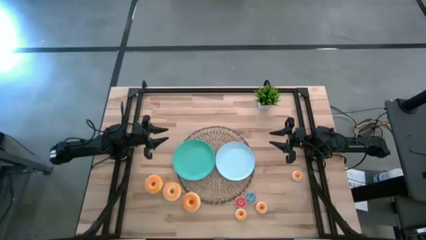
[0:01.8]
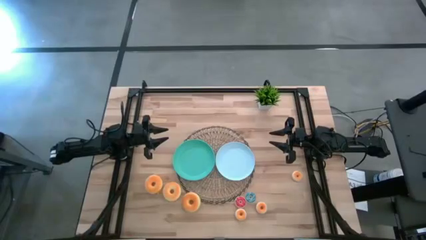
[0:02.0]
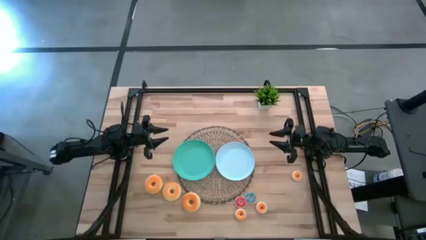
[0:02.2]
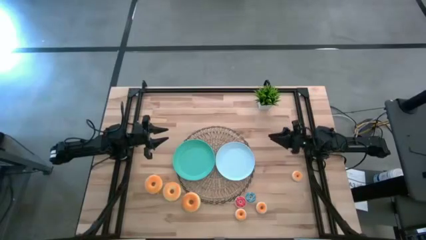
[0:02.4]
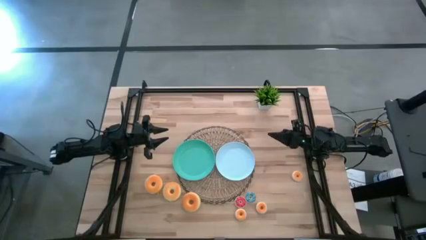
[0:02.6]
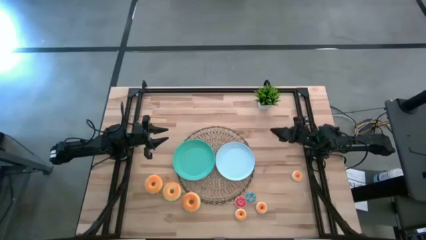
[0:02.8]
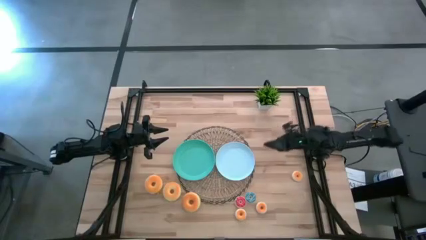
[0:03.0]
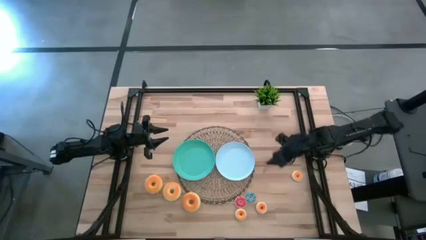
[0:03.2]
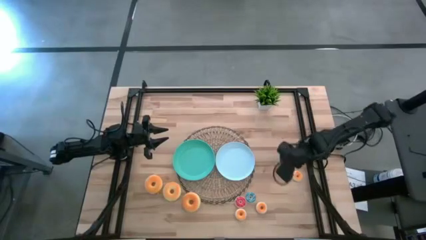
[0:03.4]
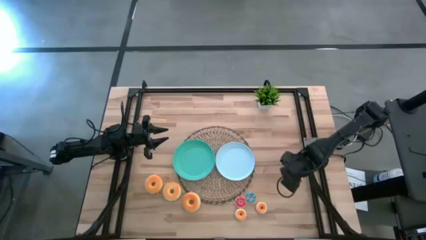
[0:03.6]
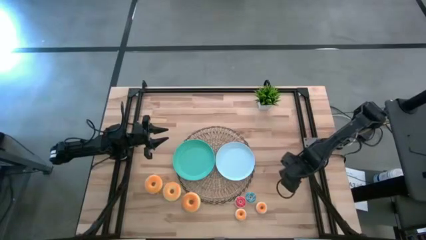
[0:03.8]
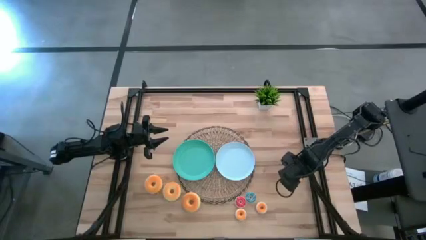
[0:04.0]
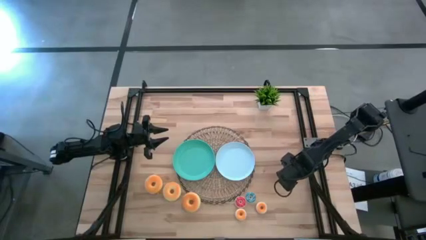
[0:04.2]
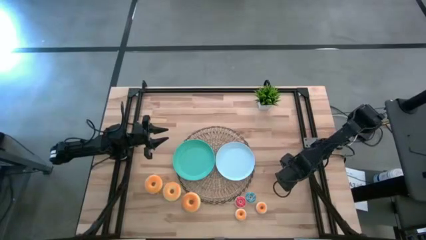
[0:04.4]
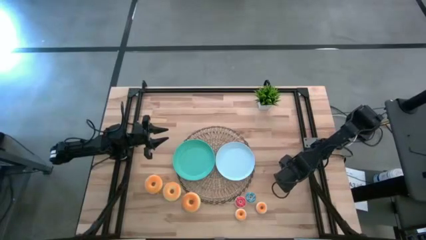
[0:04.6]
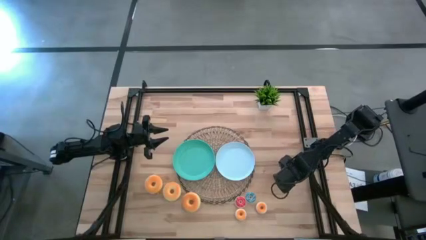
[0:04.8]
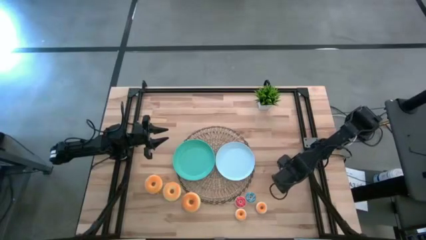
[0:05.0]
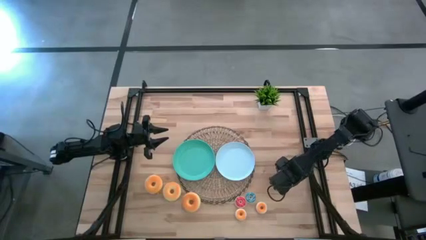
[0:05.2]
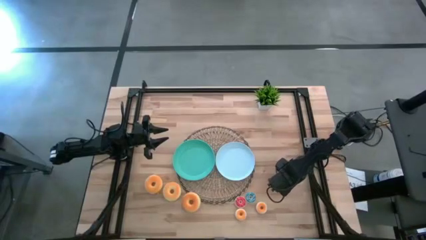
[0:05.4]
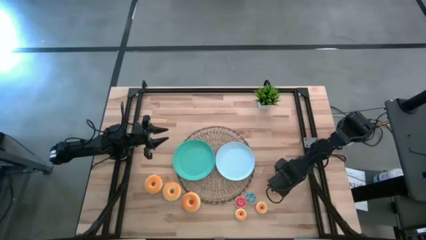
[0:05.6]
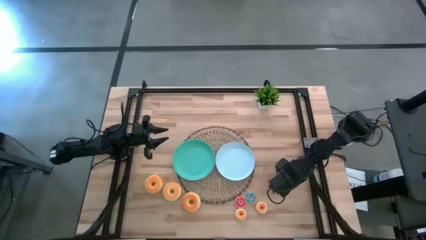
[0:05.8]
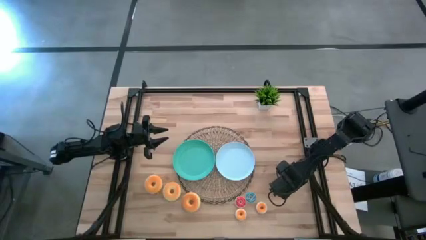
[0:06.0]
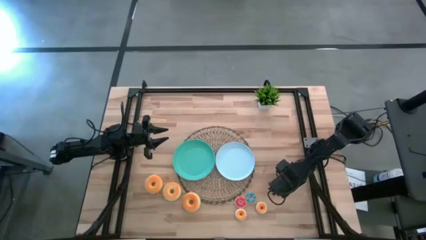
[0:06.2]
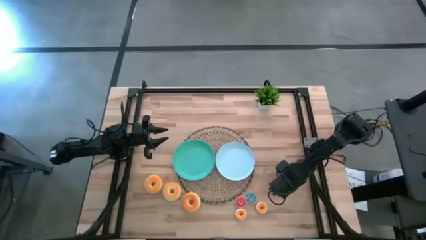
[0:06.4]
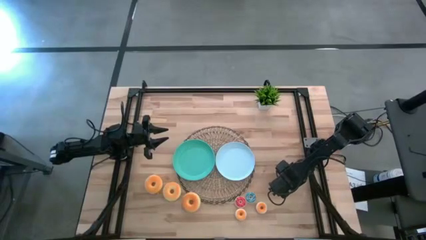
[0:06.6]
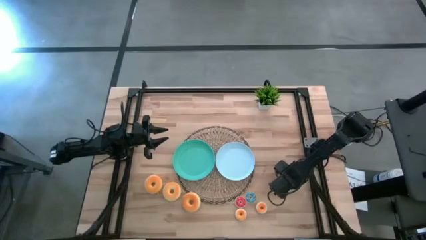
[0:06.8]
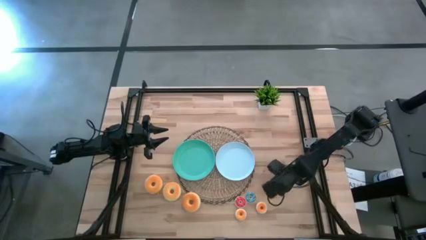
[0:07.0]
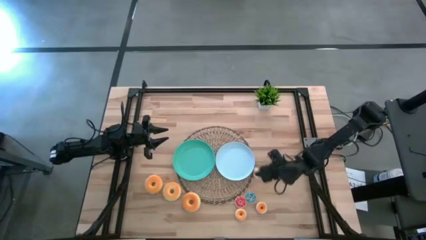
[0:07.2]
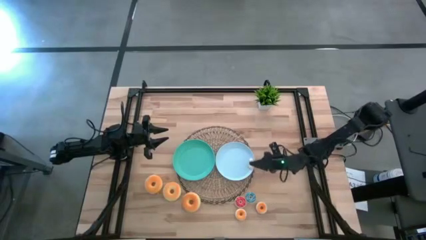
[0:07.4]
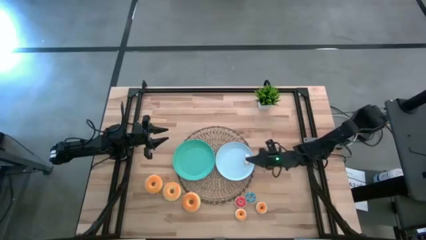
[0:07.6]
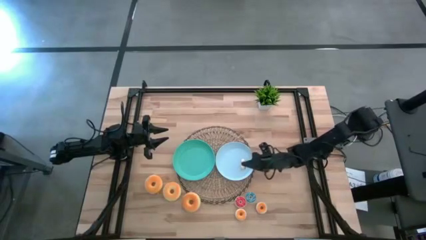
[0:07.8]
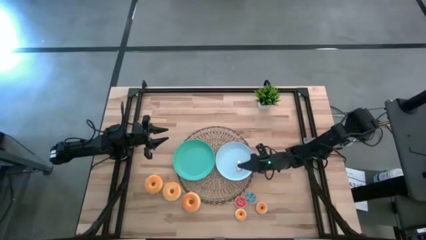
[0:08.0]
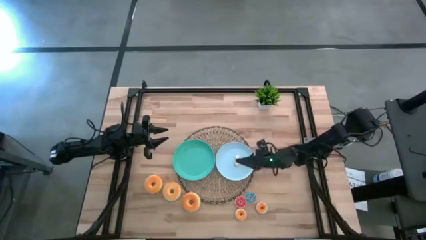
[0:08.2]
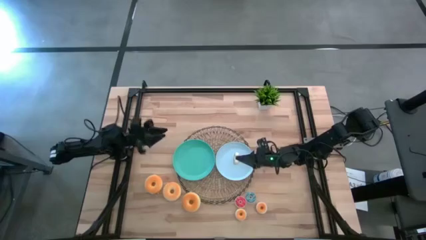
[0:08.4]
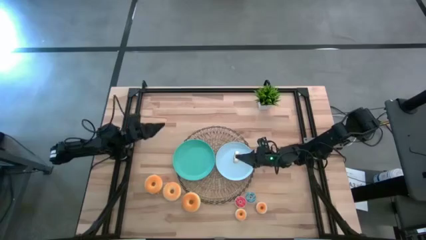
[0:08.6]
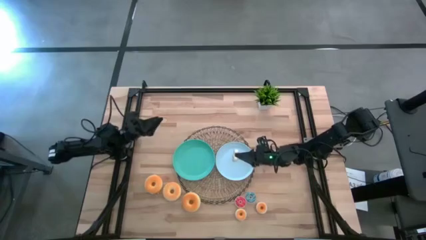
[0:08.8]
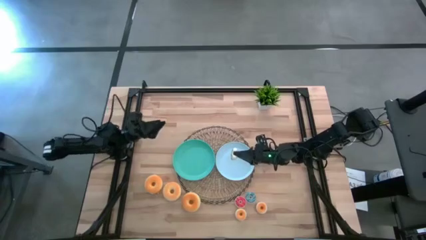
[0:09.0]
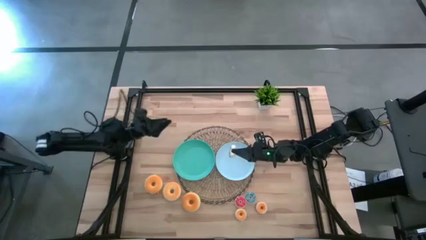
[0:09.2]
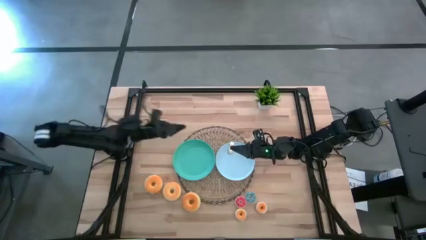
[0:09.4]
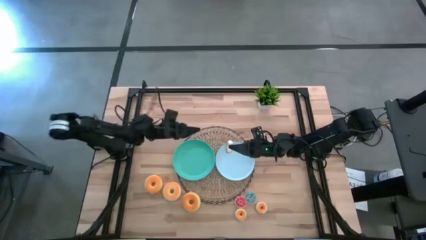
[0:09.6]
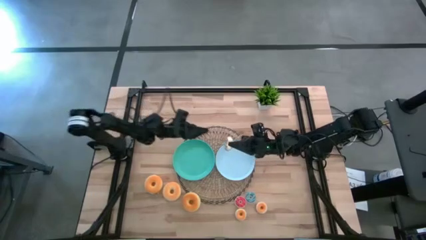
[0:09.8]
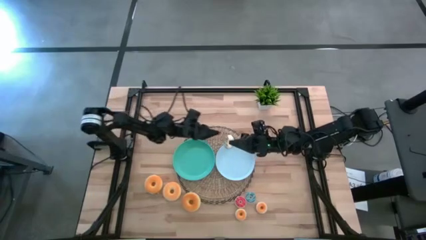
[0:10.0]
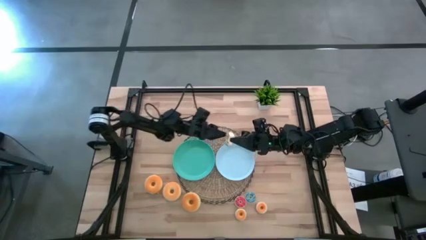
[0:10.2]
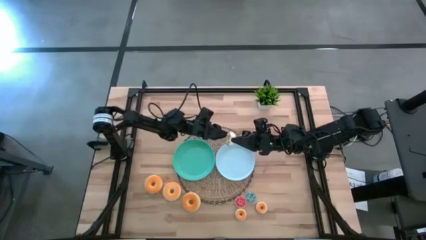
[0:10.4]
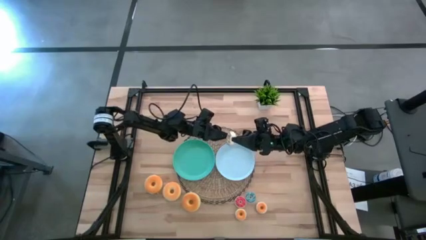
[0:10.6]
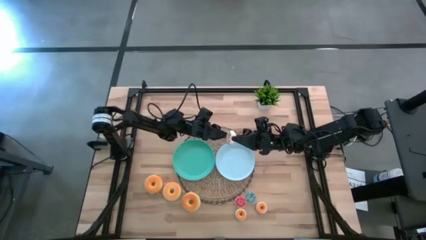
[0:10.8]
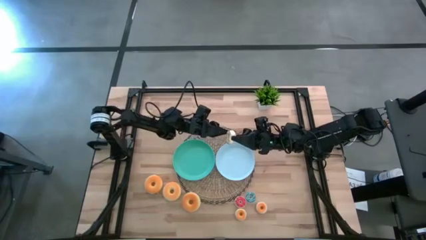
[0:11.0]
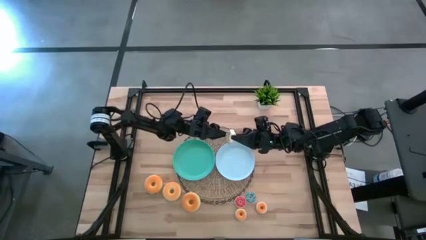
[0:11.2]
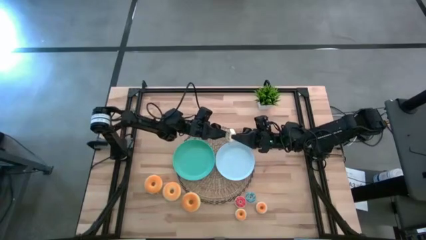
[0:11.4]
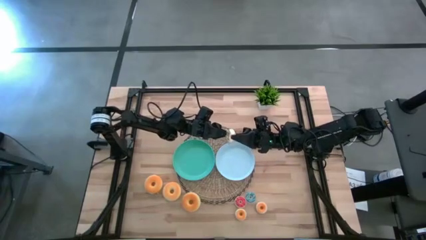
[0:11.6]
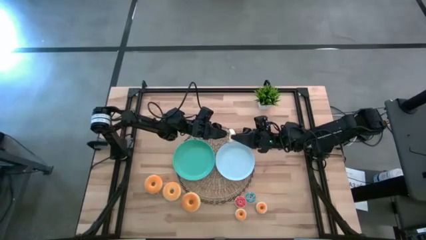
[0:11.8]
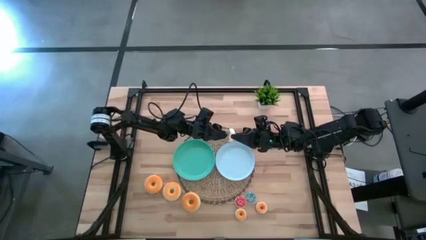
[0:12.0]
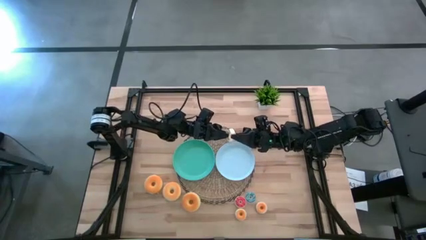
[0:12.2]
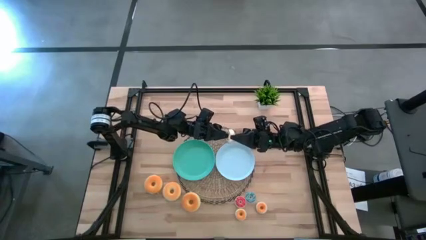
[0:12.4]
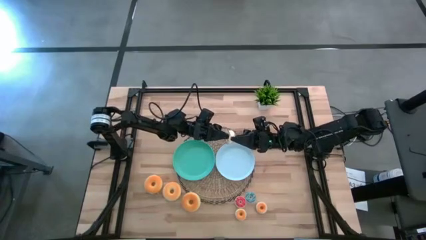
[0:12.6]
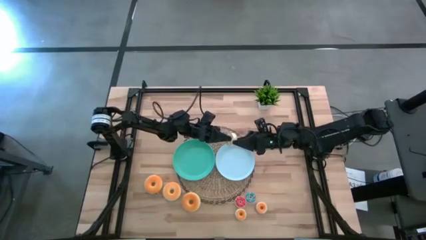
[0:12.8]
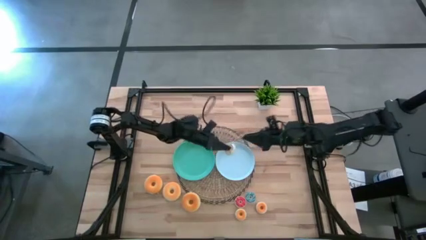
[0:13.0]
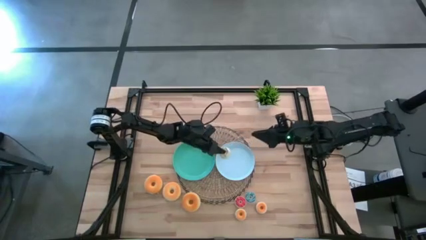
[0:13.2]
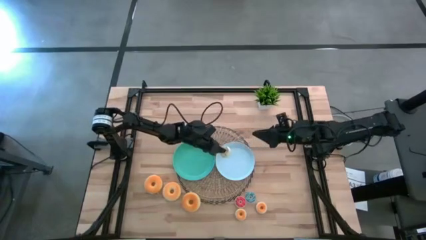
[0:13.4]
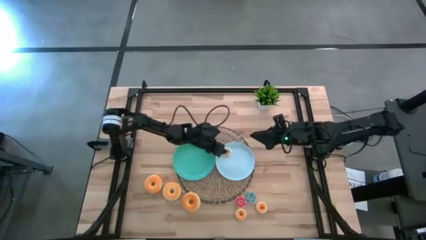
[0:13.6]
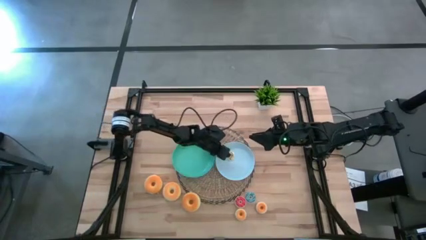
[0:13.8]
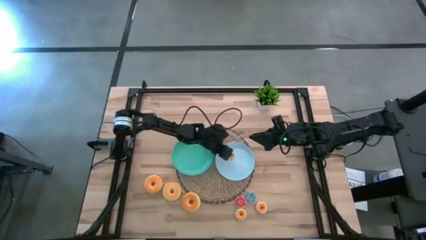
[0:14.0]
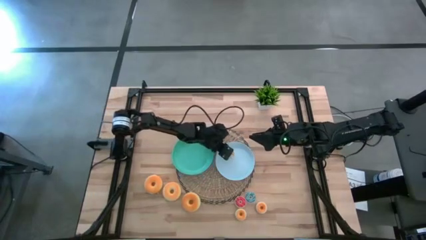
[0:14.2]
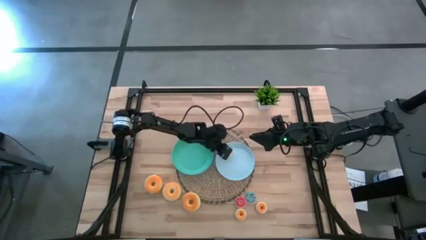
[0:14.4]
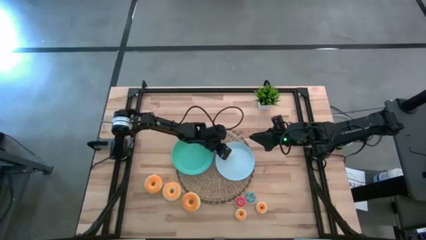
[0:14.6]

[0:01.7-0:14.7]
Task: Pick & Place donuts
Put the small white donut on the light blue plate

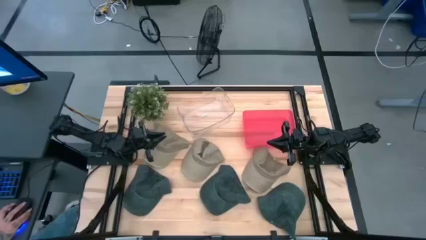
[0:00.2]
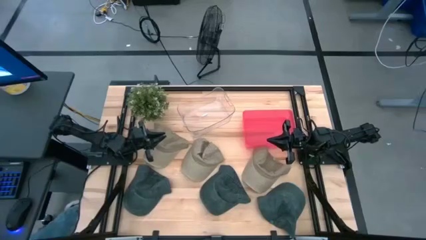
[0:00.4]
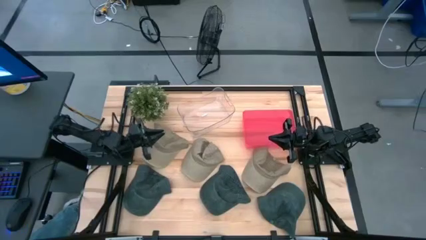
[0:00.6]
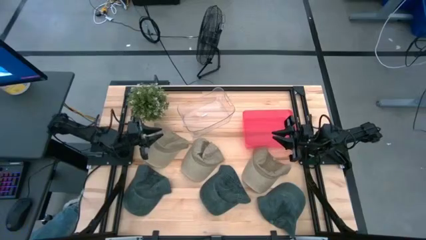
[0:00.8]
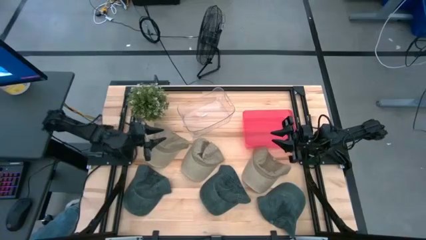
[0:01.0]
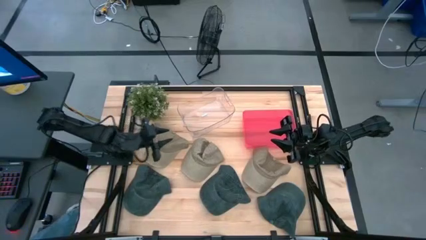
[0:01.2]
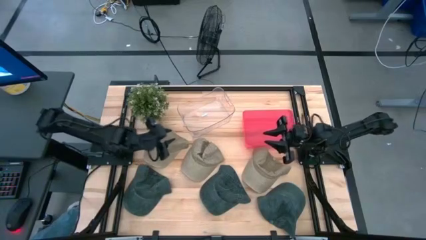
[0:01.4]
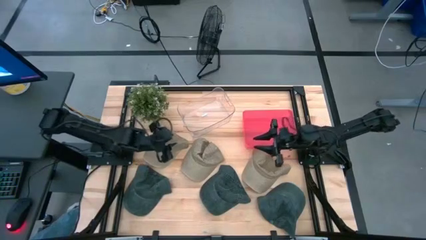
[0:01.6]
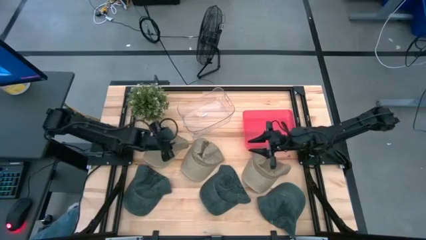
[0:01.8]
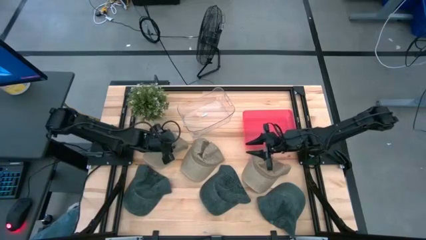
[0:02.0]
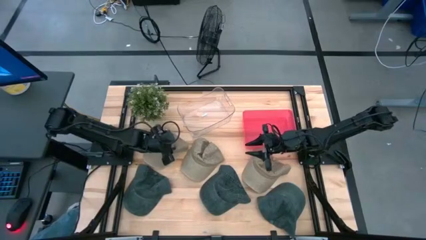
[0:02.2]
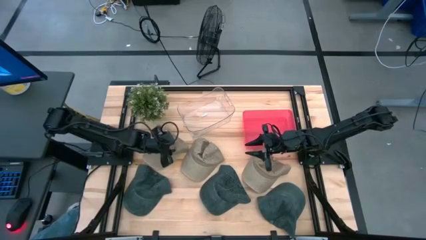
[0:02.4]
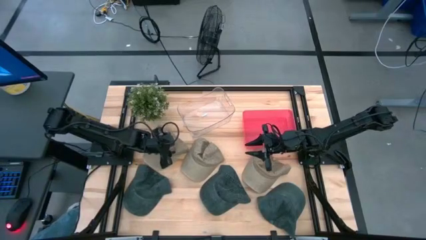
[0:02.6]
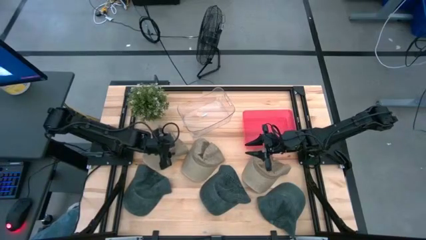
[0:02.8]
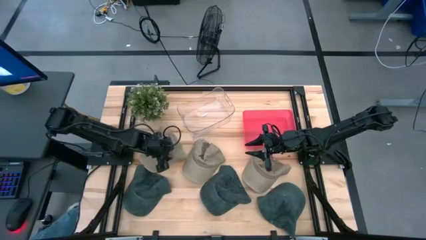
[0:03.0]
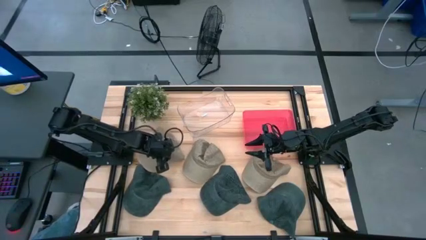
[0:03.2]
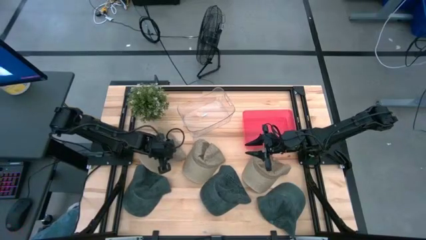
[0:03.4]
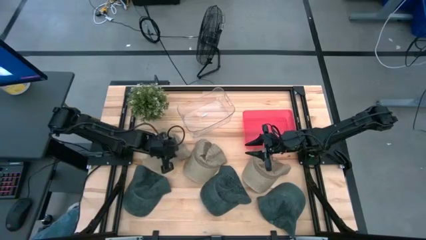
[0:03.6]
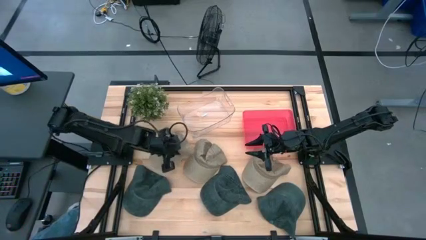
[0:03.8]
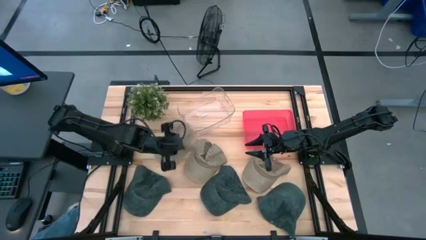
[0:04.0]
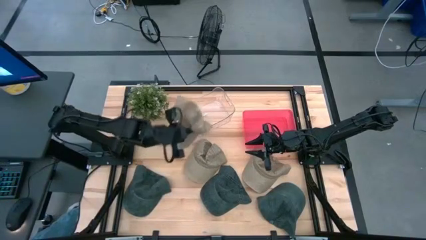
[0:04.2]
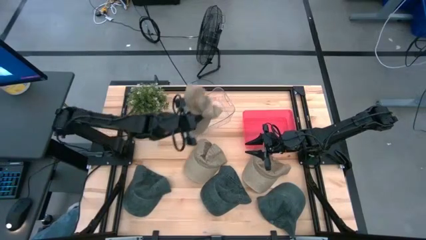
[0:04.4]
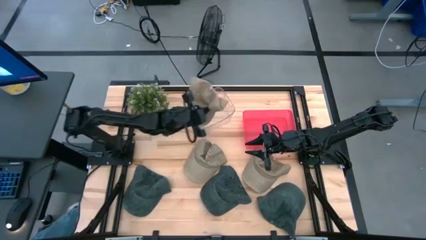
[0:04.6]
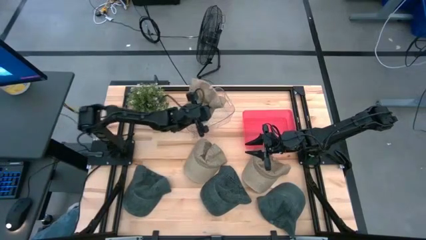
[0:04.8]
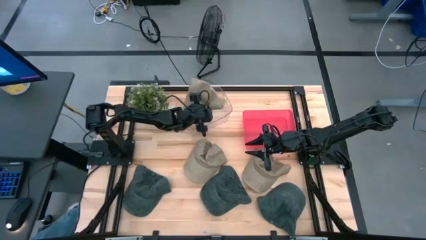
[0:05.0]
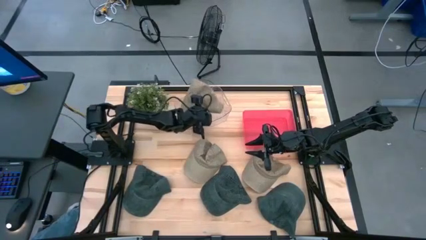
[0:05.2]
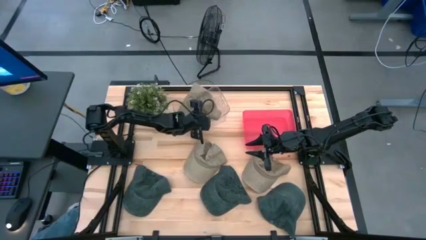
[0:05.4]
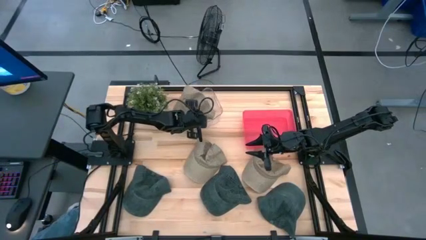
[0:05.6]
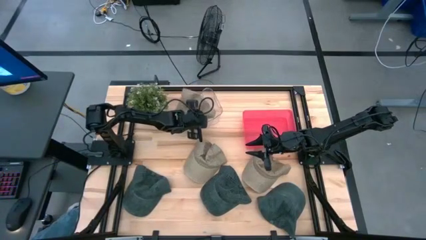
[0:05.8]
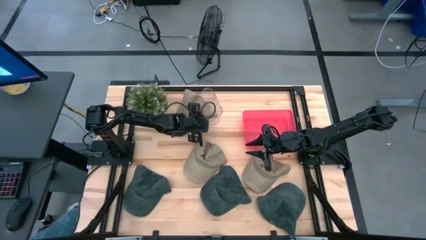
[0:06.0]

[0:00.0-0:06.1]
Task: Pick & Place hat
Put the left brown cap into the transparent bin
